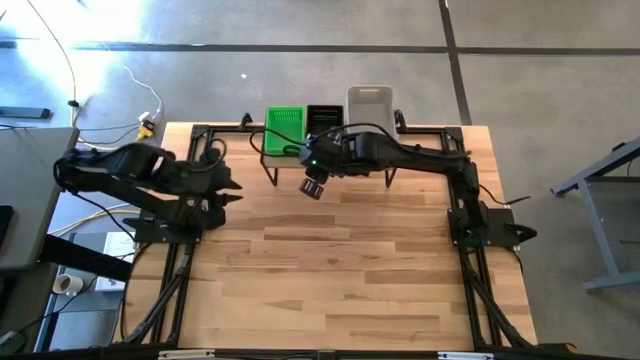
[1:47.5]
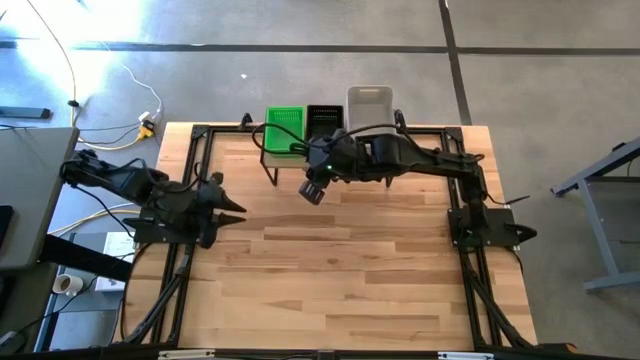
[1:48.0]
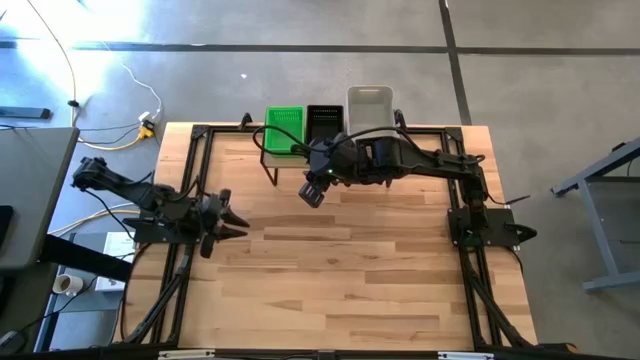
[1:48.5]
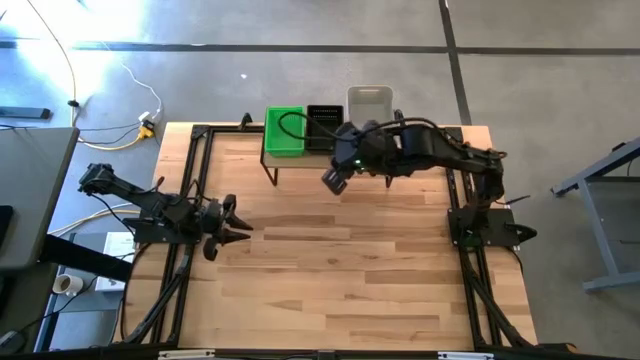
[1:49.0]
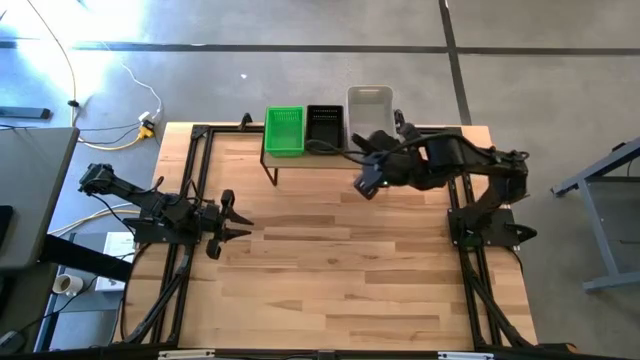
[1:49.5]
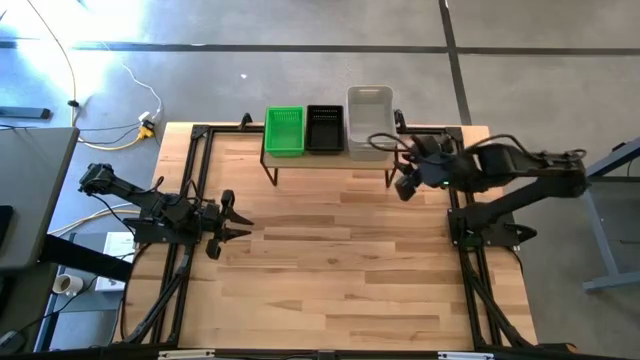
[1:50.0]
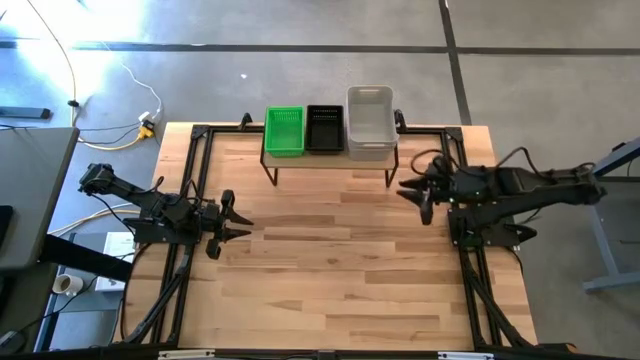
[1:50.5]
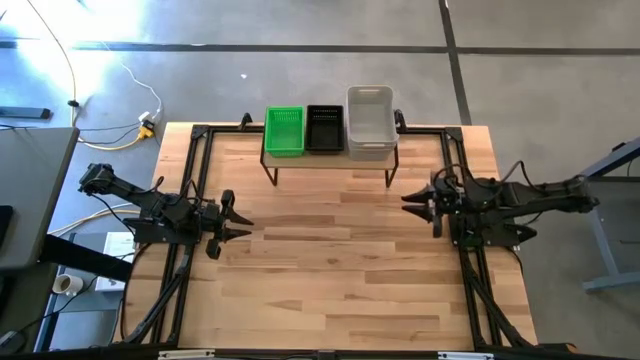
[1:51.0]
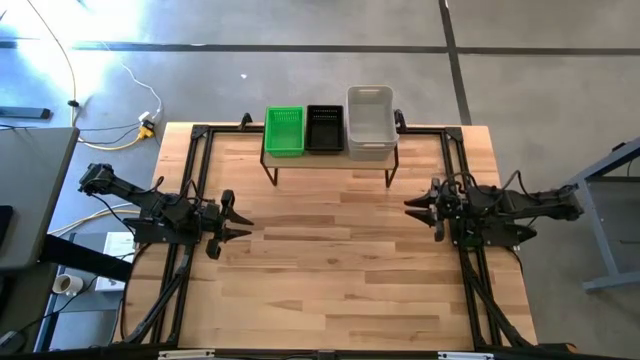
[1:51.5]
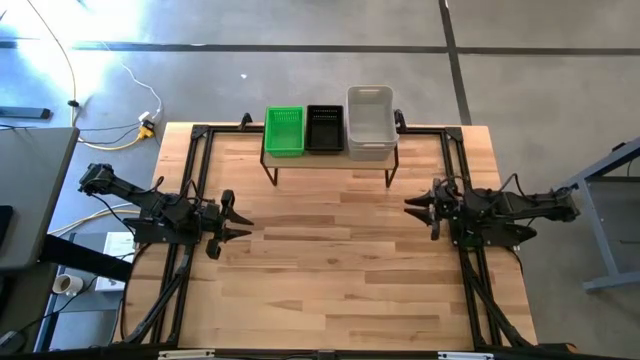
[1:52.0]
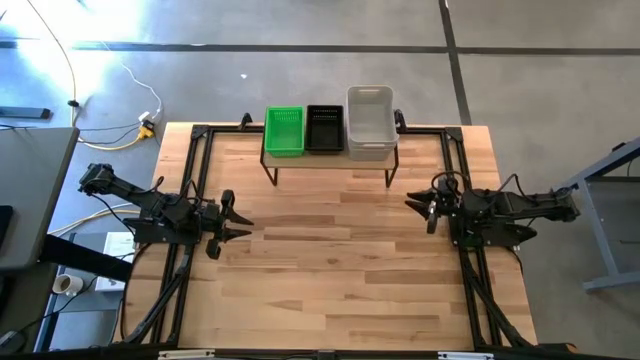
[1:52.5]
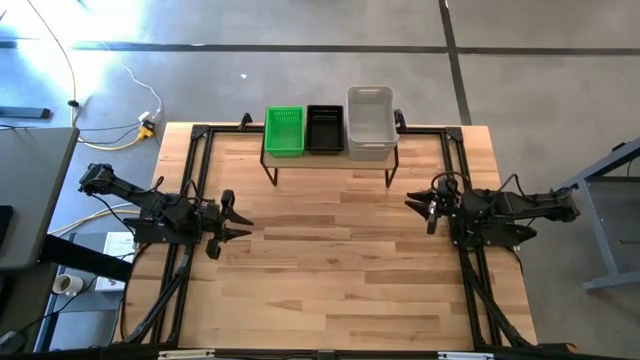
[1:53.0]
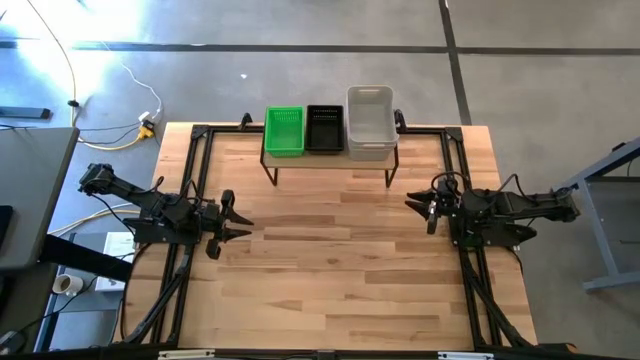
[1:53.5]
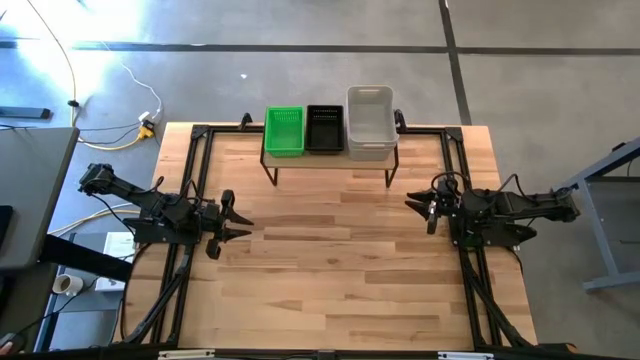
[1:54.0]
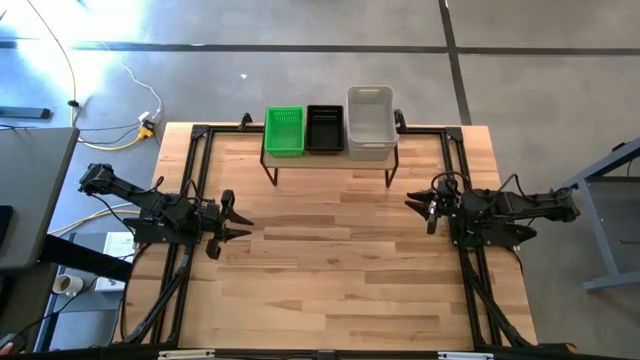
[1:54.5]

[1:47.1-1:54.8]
Task: Stack baskets on shelf by color
Return to Home Position

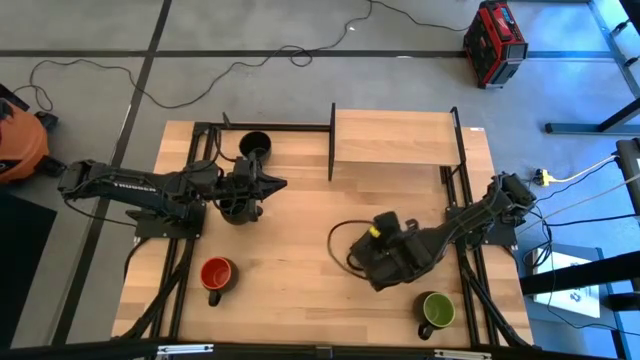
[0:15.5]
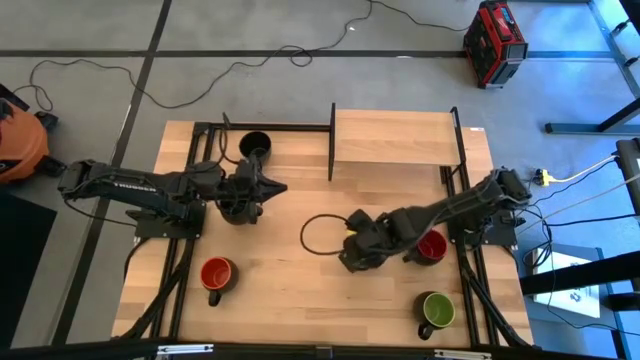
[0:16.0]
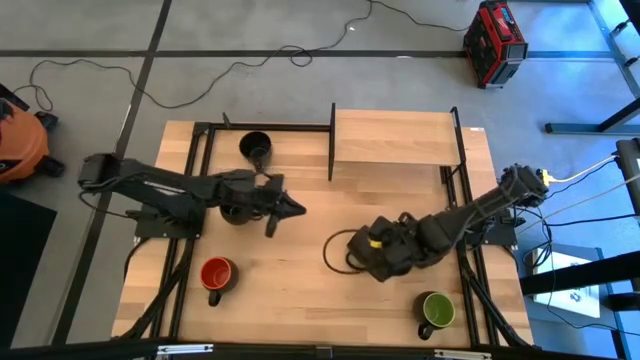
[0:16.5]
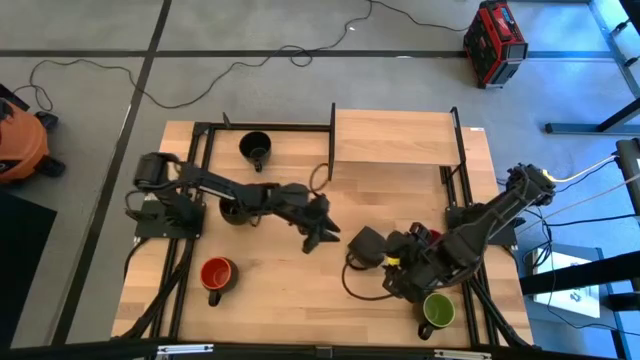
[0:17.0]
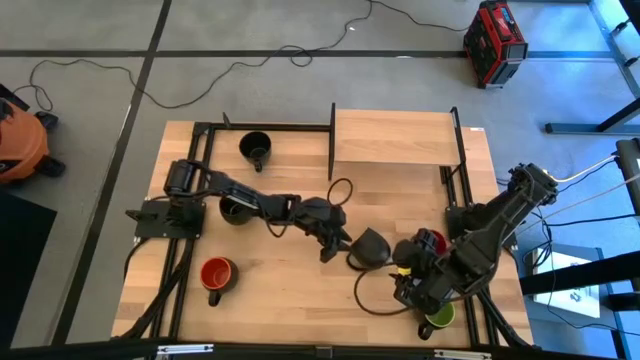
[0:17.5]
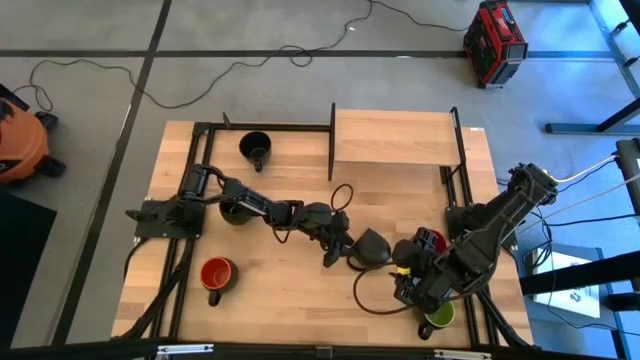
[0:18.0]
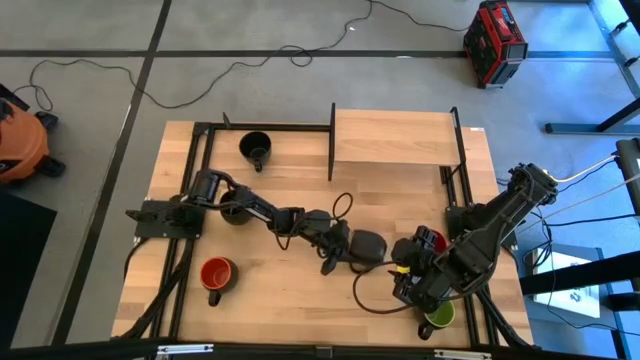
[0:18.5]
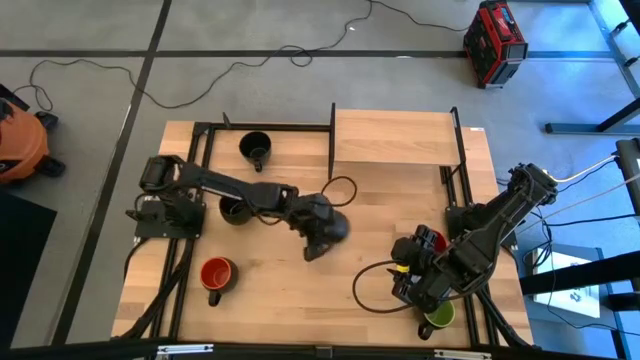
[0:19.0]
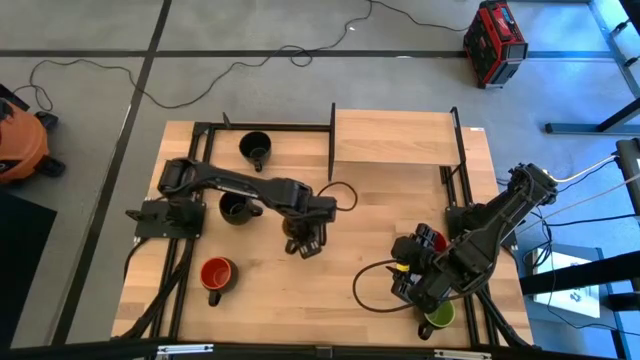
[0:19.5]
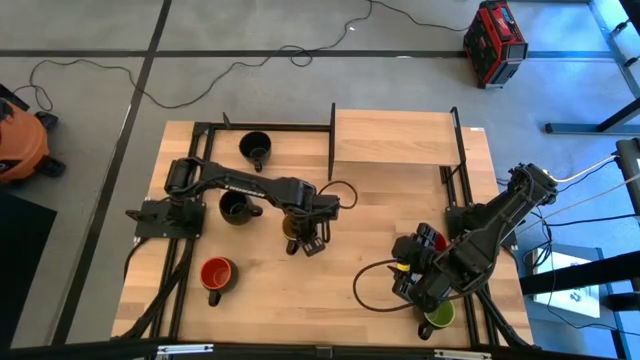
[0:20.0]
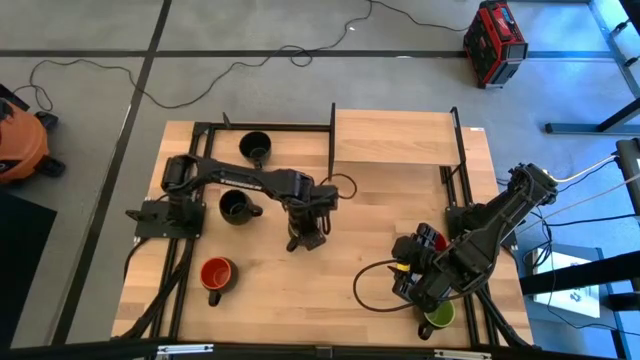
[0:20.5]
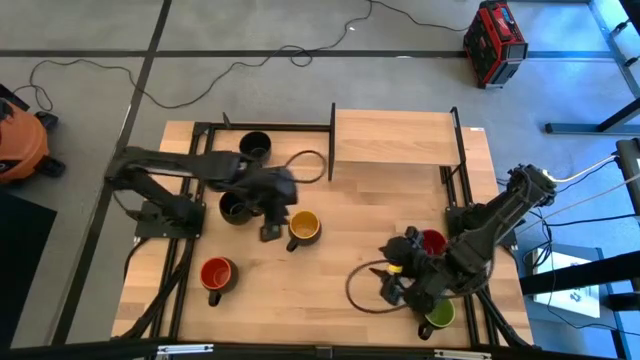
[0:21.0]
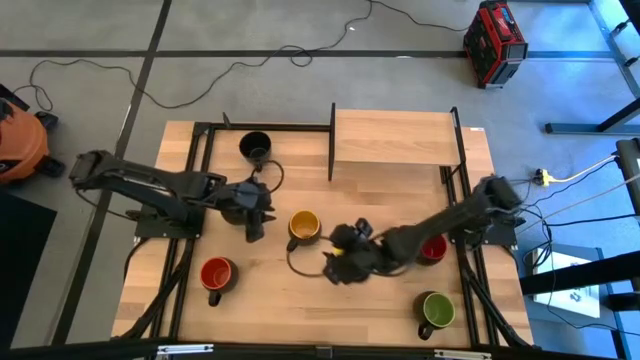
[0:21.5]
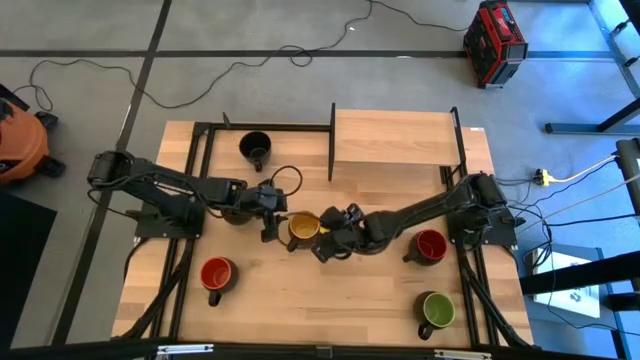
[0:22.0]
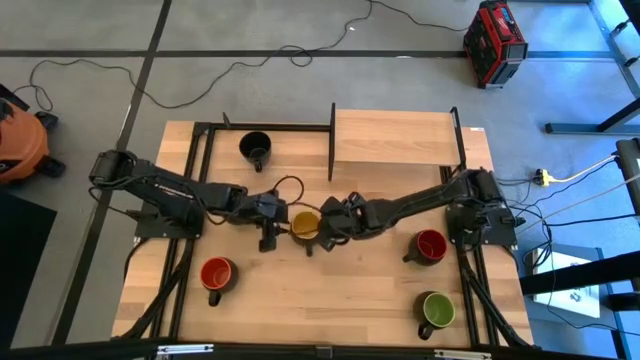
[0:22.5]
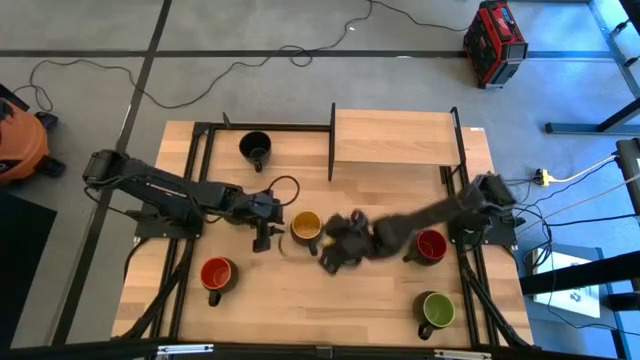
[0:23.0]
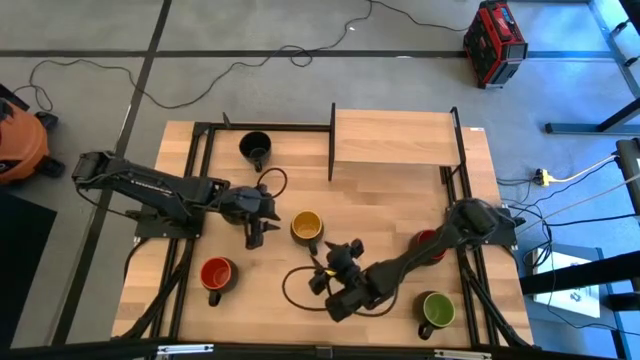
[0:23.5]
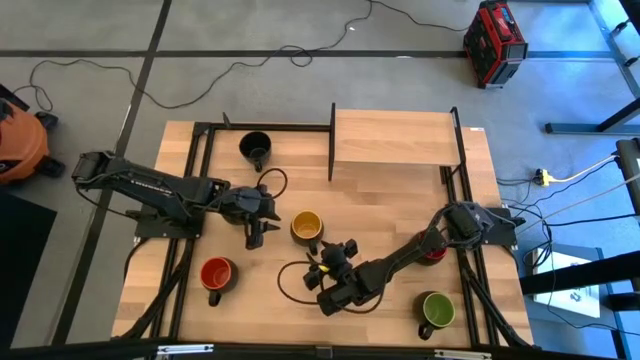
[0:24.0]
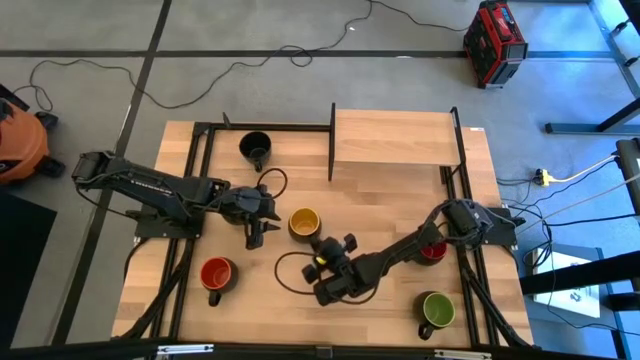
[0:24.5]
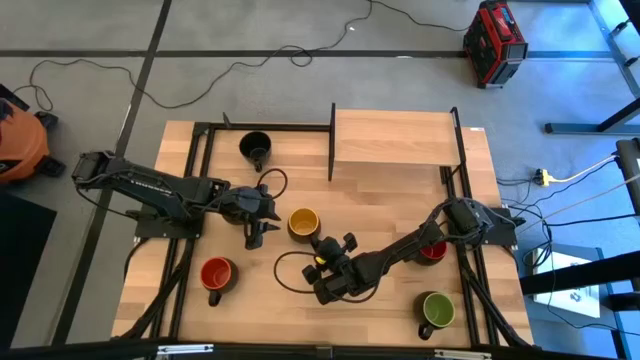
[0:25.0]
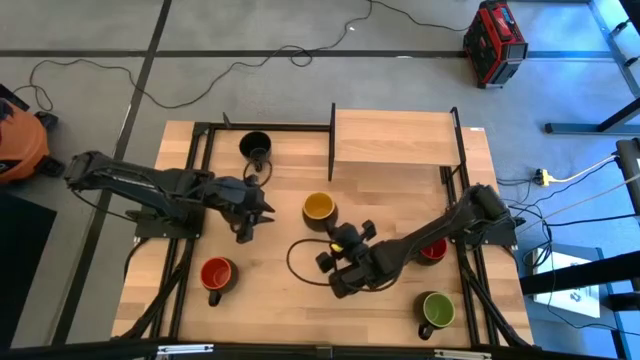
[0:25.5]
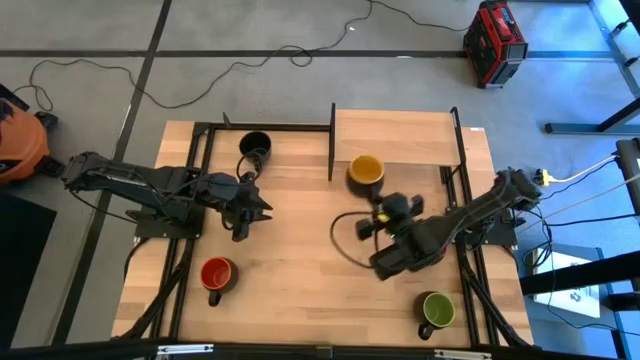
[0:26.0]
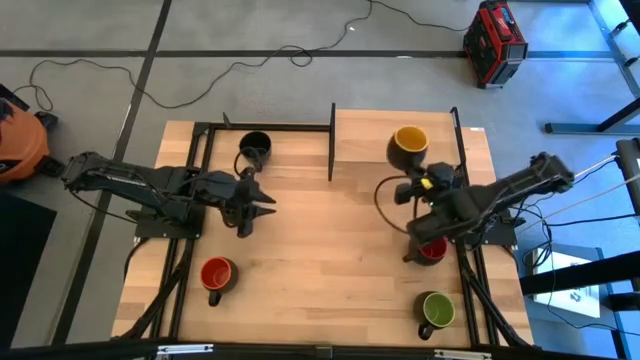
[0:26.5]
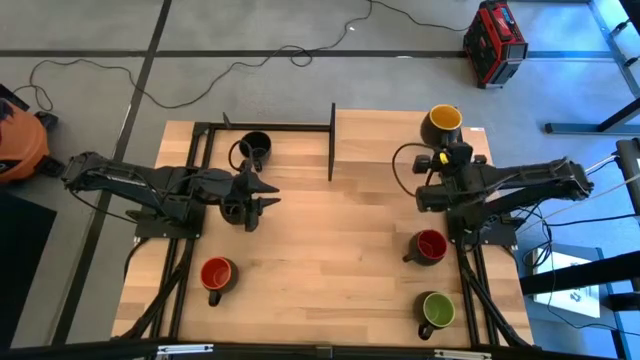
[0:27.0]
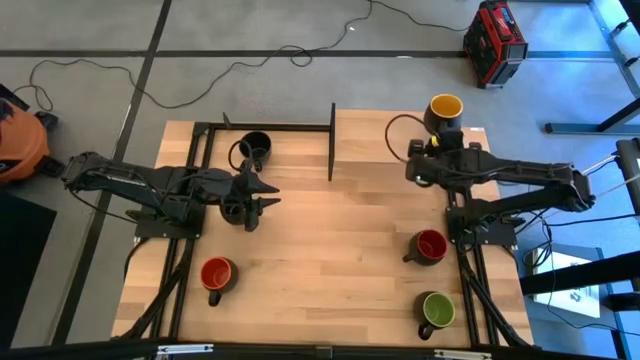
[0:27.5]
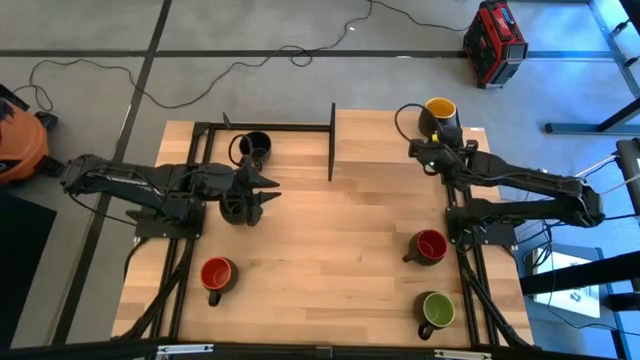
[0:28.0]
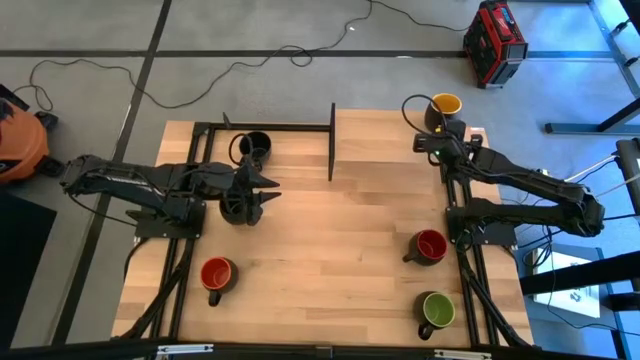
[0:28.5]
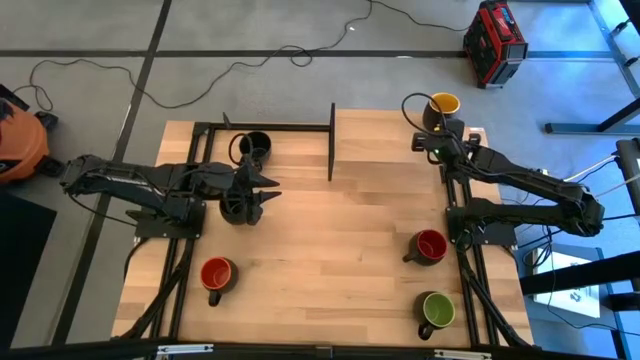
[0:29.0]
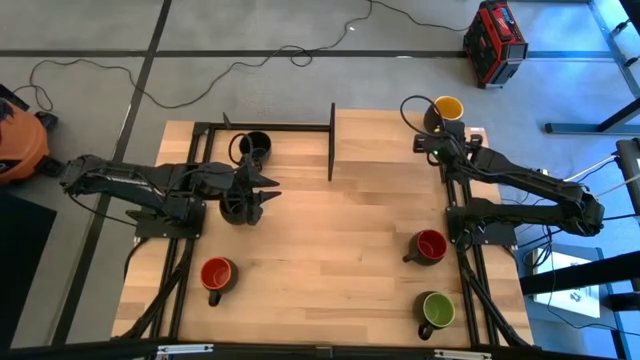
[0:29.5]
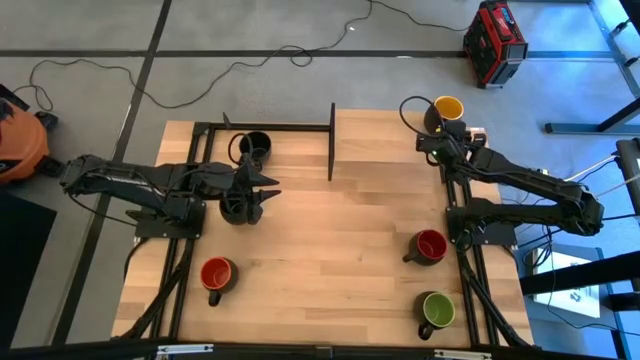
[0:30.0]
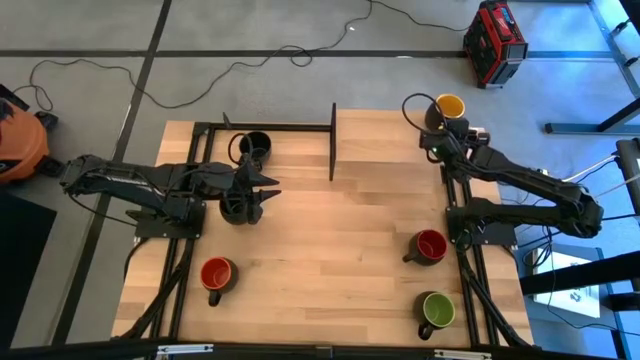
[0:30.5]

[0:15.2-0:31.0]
Task: Place coffee mugs
Put the yellow mug on the shelf
